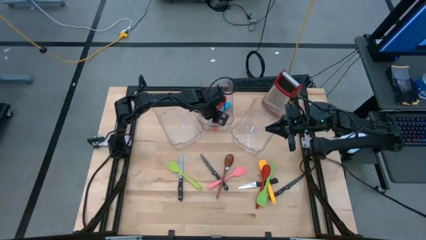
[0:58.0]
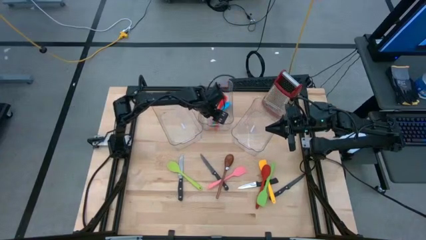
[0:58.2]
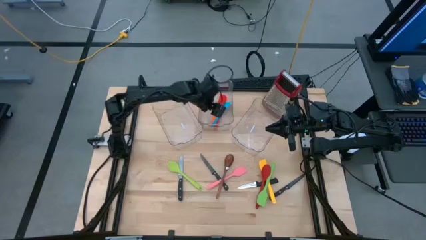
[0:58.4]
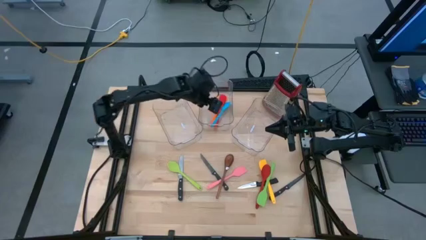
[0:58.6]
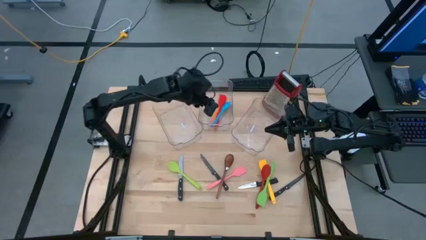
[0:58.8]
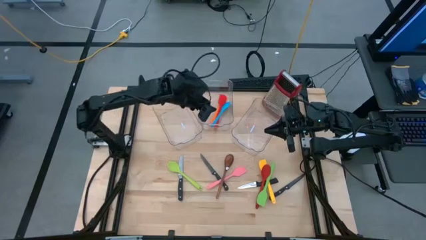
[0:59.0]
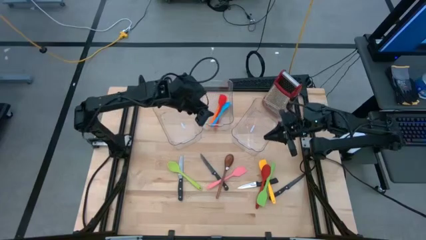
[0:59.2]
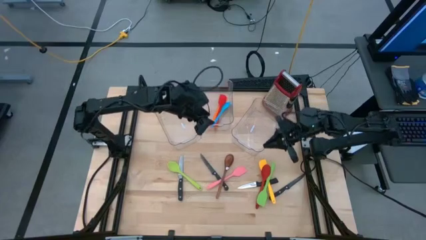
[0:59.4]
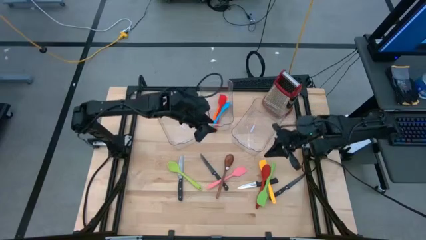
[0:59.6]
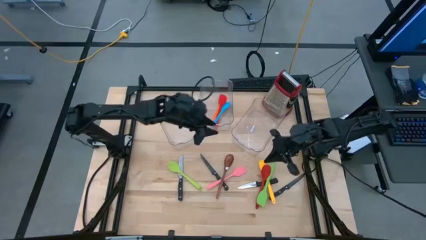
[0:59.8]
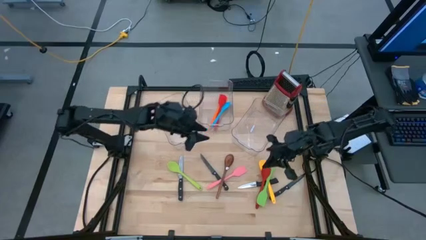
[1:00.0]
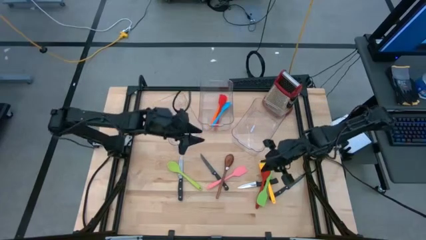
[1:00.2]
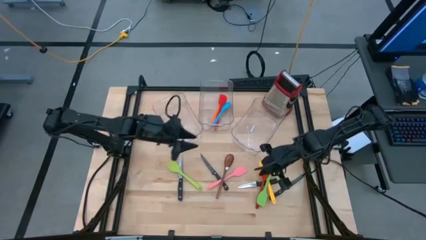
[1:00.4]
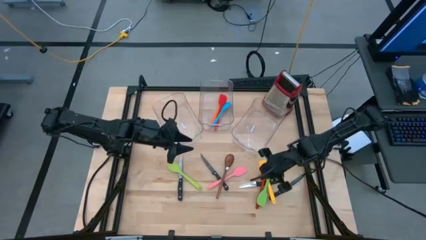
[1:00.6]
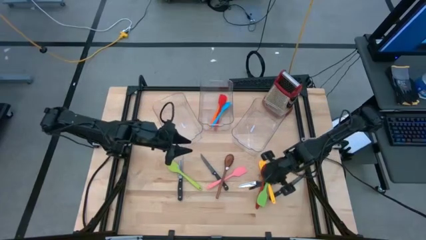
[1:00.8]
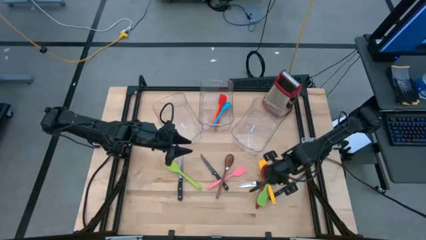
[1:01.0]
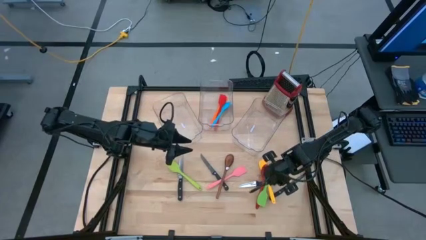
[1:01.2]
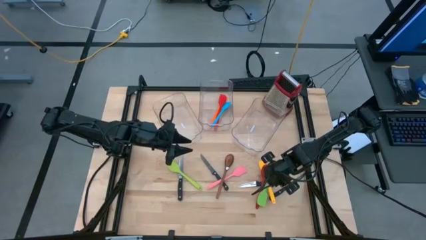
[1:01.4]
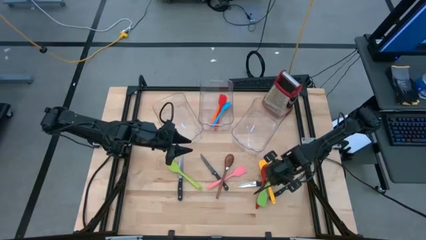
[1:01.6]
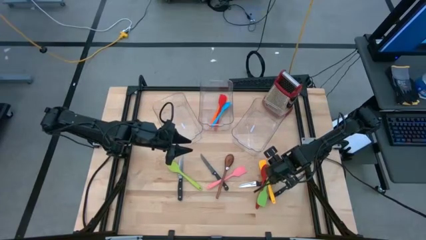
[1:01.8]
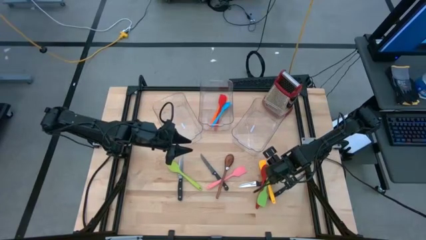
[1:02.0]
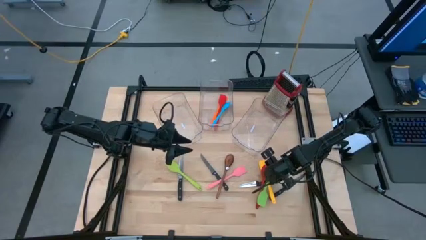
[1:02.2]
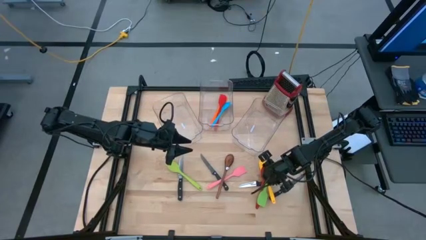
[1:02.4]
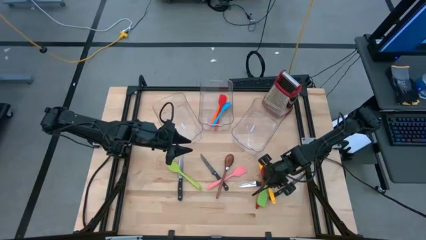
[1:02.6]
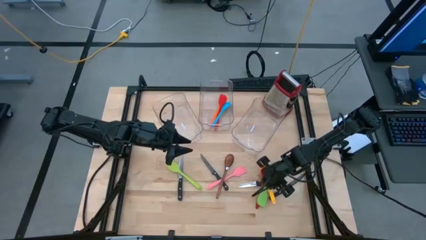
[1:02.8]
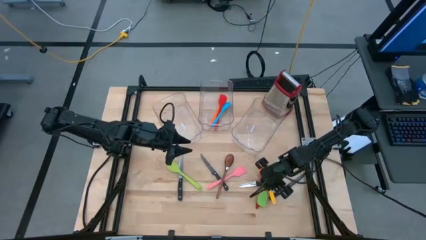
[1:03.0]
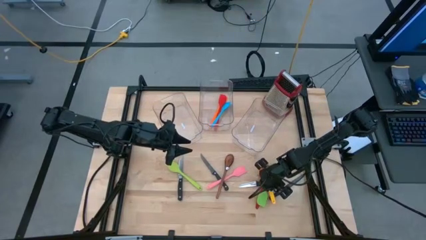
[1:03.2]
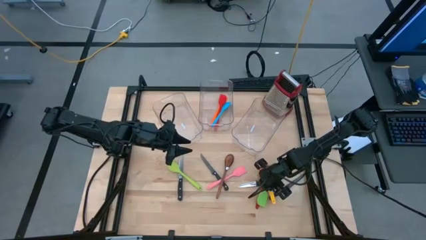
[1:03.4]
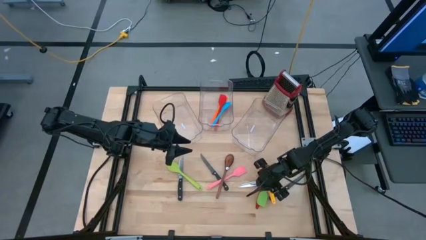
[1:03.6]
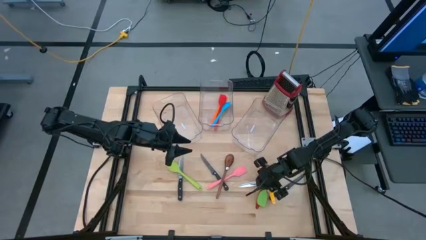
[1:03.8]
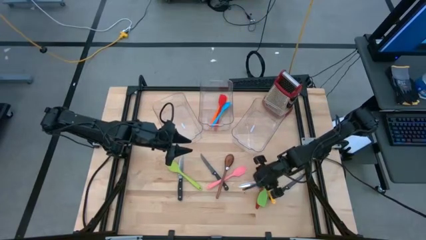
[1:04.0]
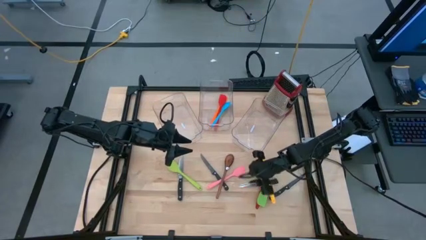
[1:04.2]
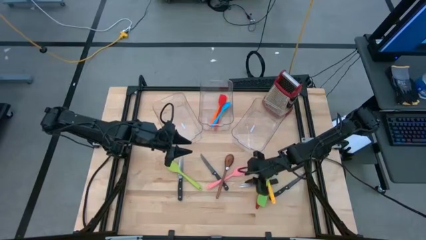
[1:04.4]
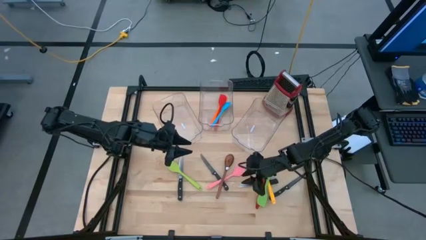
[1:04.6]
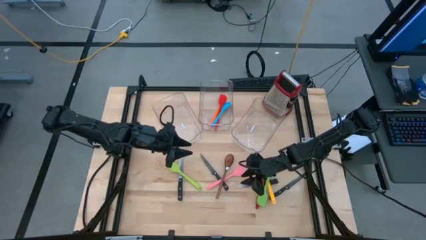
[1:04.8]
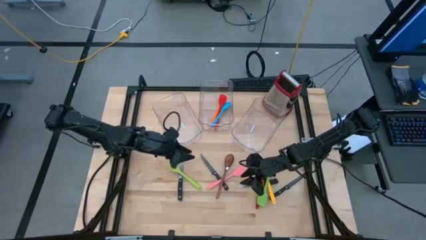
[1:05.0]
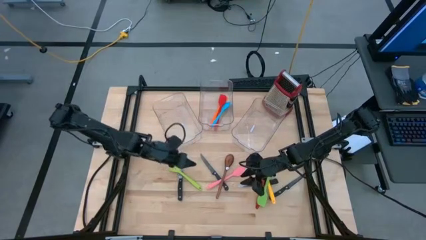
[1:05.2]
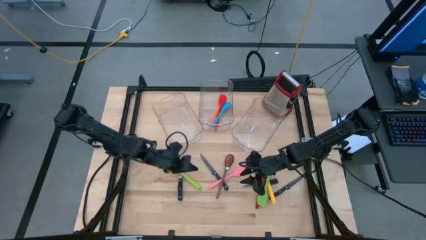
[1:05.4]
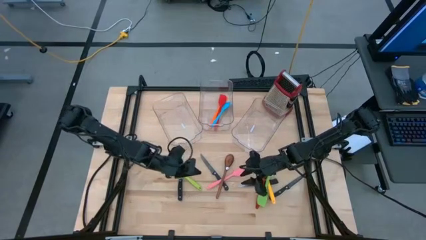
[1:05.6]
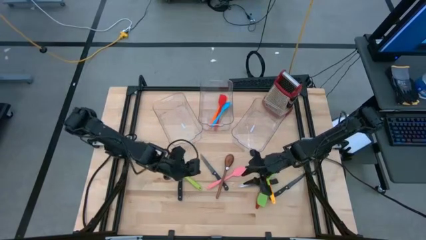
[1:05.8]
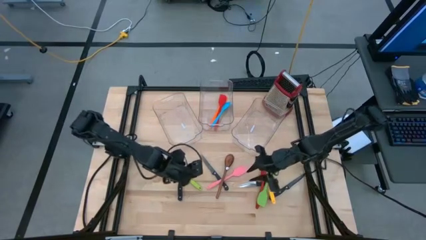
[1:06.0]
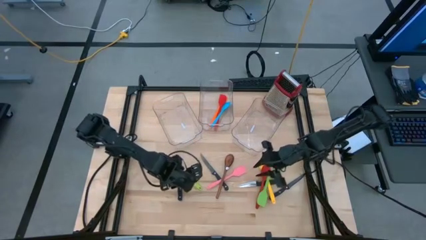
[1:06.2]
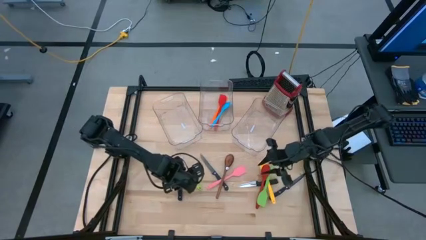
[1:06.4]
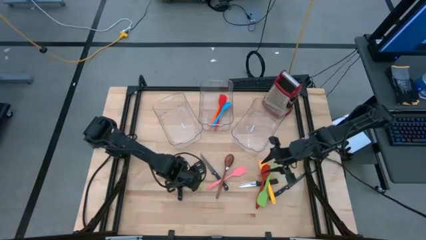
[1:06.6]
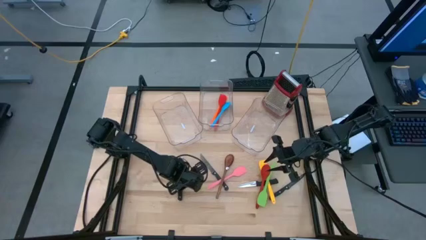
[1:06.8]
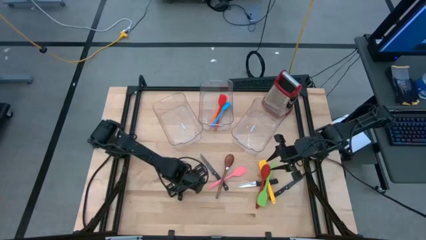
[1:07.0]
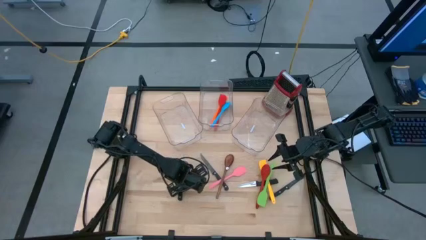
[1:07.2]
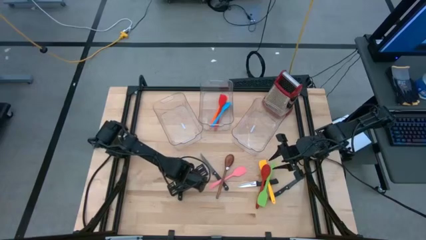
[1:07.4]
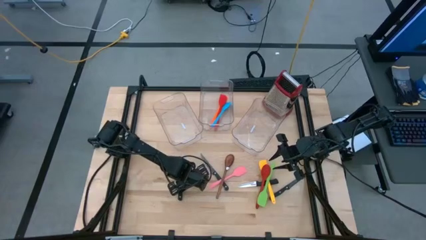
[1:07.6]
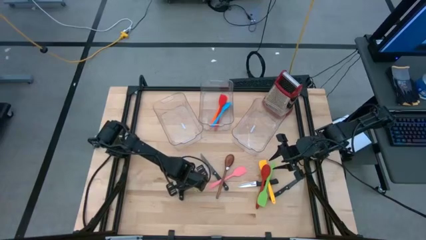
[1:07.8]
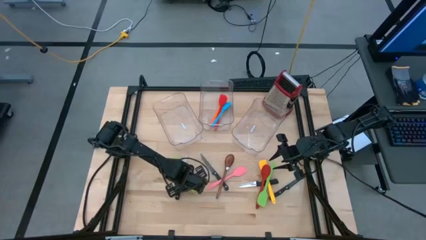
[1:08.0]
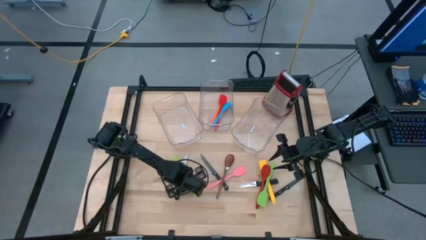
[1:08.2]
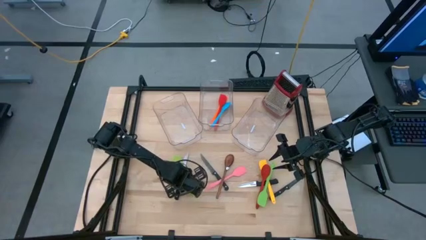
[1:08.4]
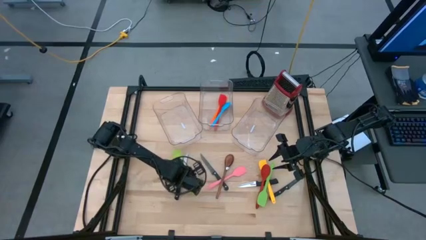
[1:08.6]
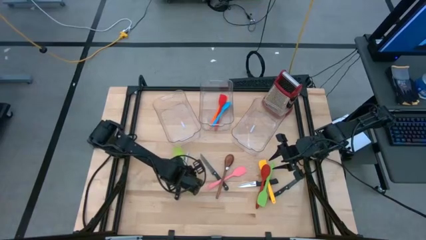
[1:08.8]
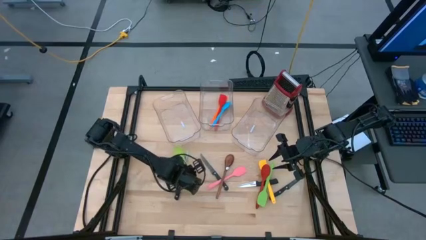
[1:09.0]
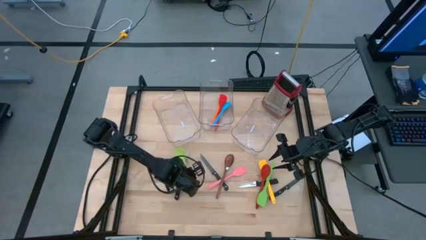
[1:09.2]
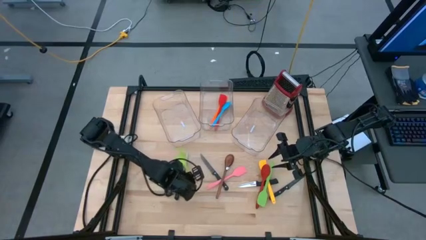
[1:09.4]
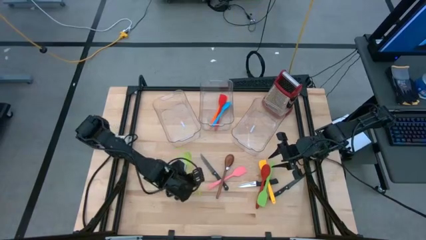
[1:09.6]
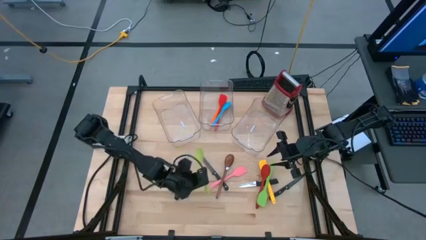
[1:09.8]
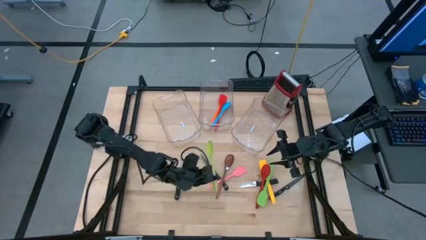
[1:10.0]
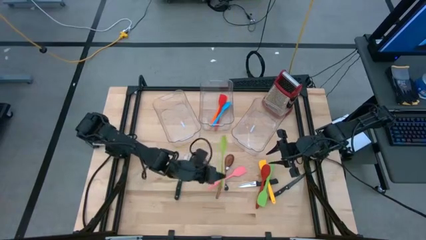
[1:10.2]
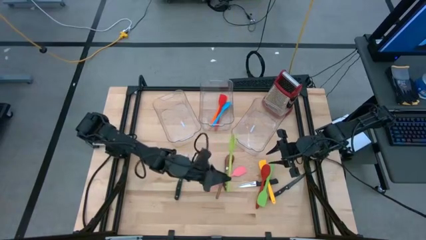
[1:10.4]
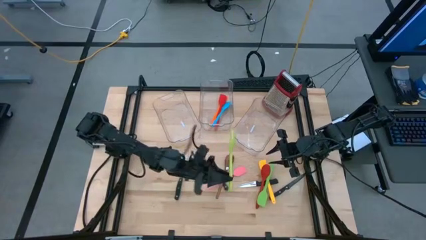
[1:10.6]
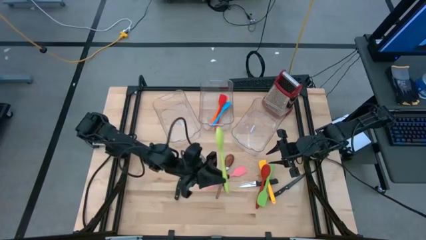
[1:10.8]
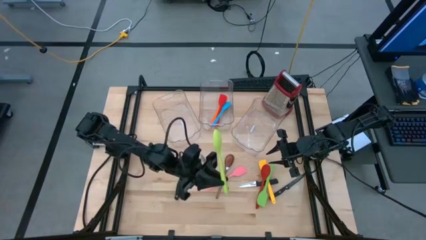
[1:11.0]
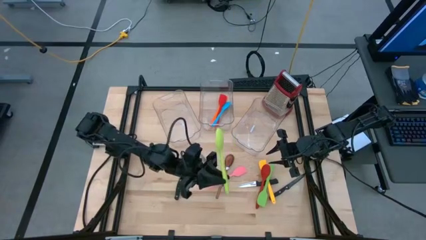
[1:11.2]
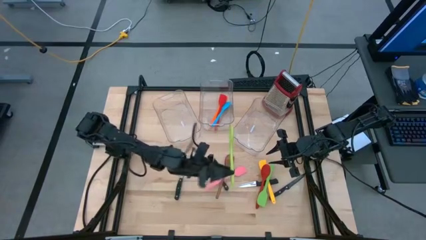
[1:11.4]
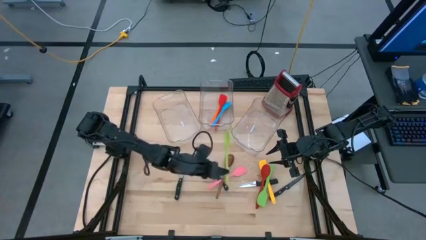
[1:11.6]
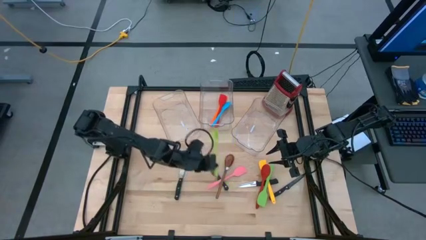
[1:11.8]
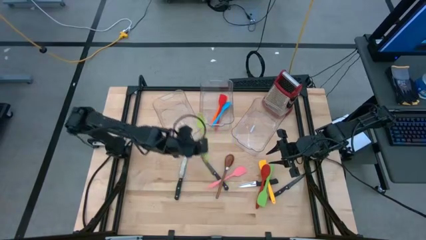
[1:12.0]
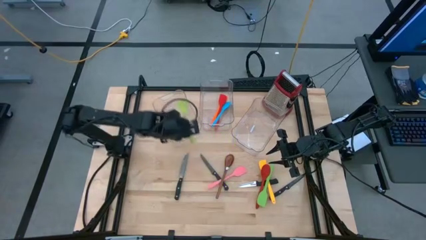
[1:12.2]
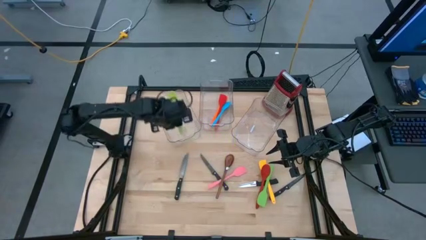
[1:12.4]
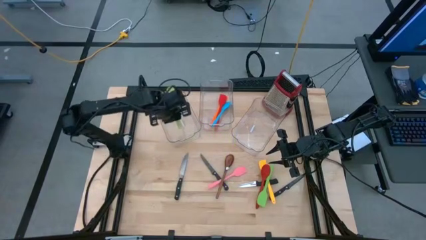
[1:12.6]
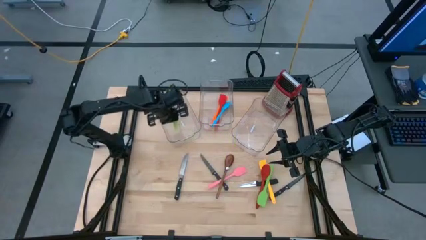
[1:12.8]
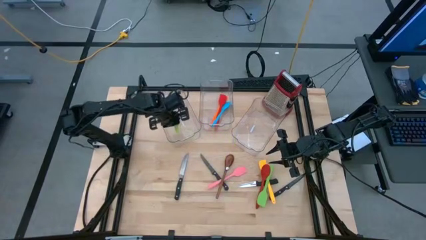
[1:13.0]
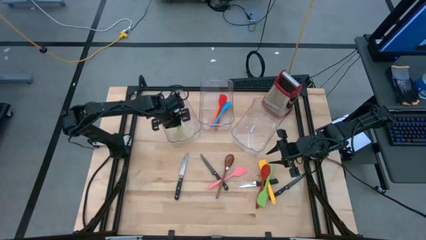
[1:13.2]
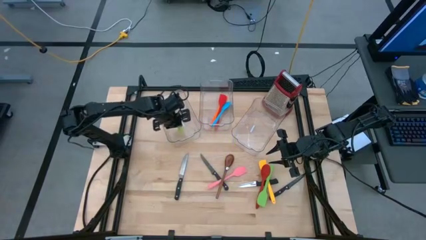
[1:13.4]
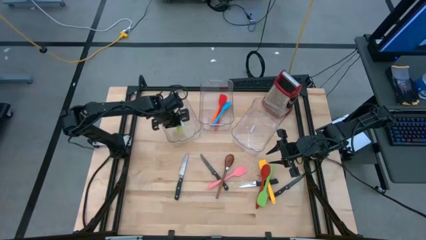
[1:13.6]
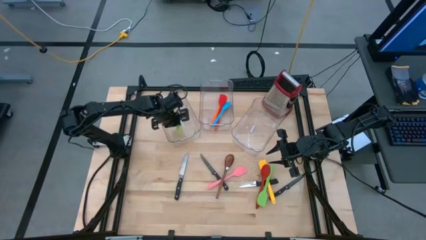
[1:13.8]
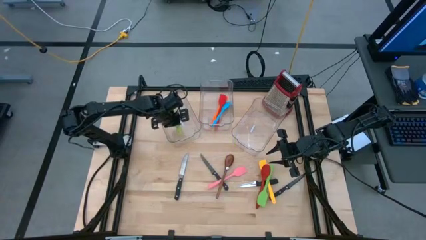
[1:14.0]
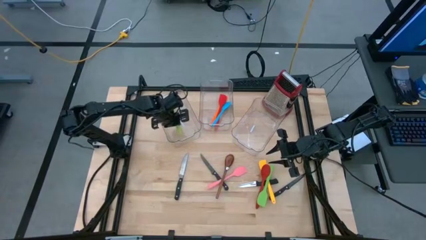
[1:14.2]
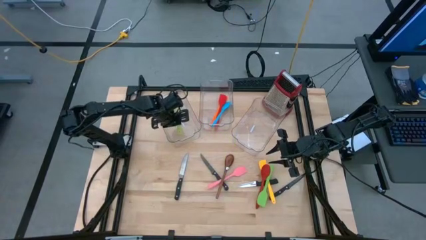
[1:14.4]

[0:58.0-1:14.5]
Task: Pick & Place Kitchen Items
Put the green serving spoon in the left bin
